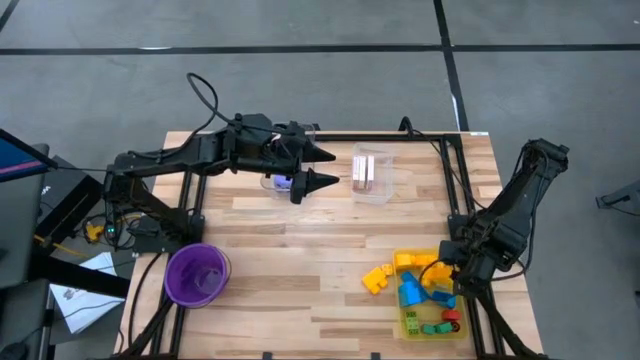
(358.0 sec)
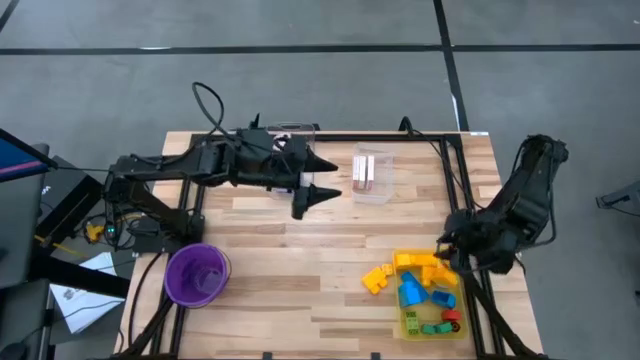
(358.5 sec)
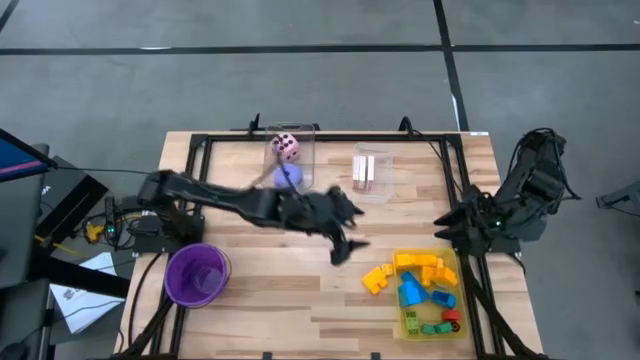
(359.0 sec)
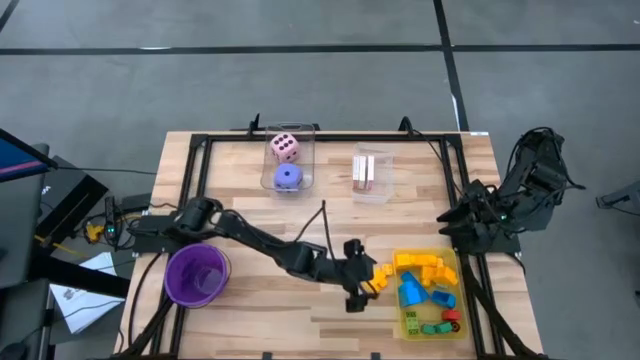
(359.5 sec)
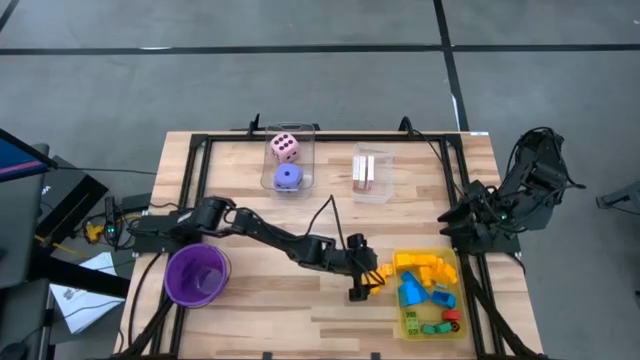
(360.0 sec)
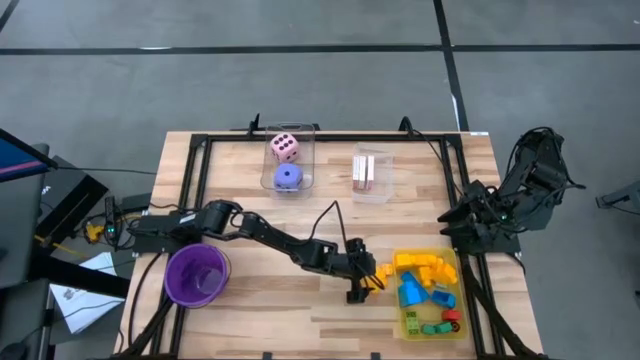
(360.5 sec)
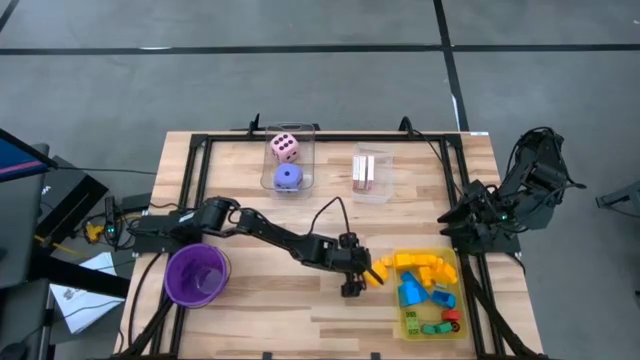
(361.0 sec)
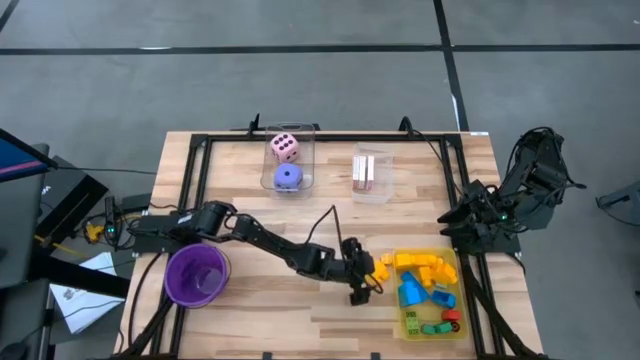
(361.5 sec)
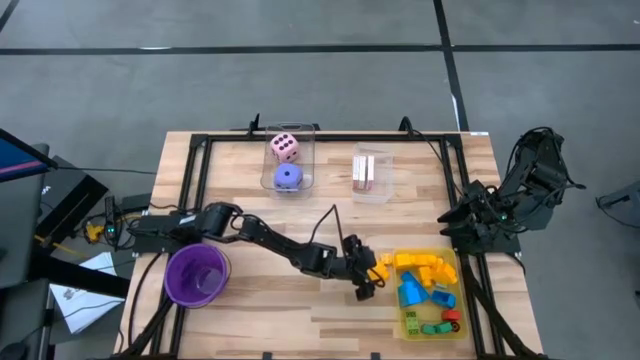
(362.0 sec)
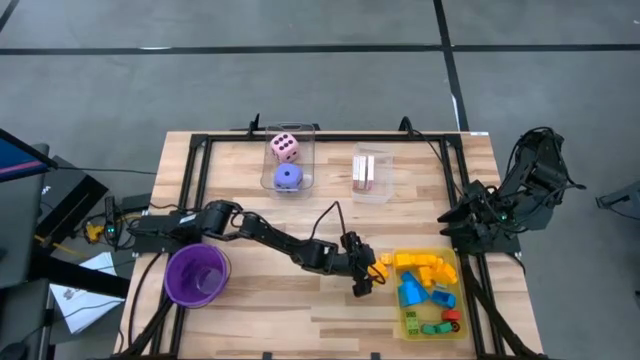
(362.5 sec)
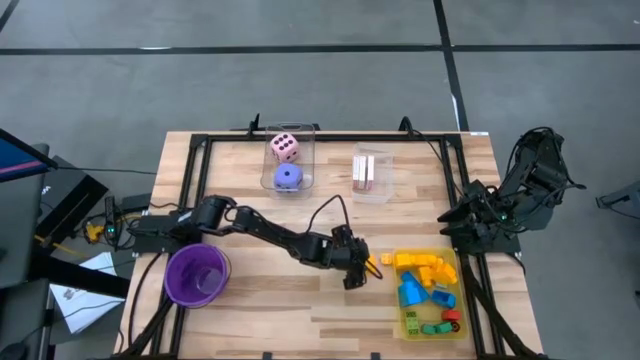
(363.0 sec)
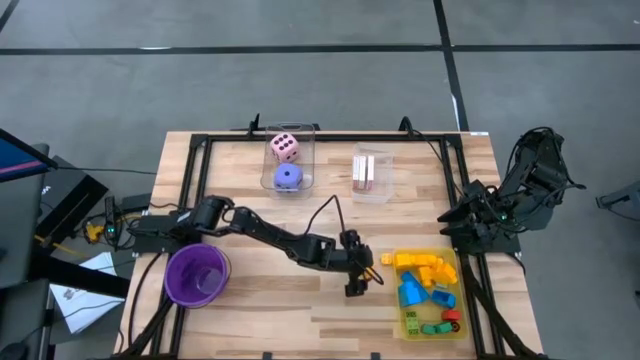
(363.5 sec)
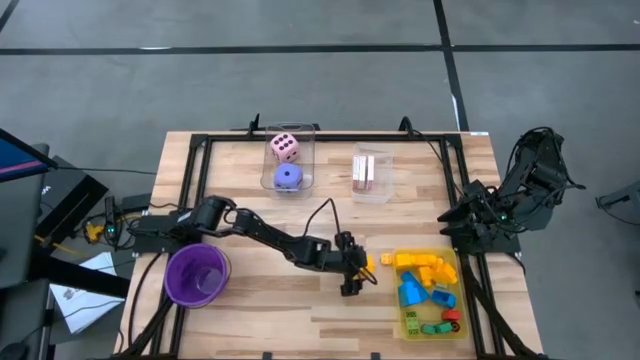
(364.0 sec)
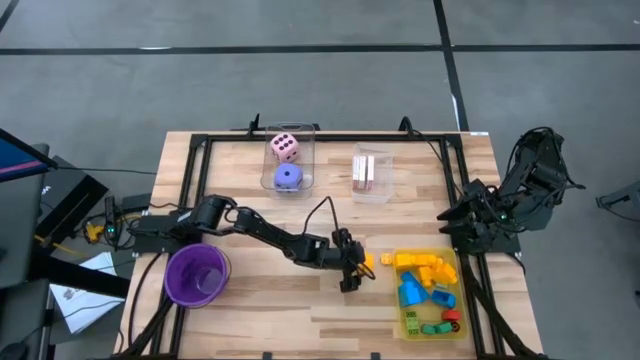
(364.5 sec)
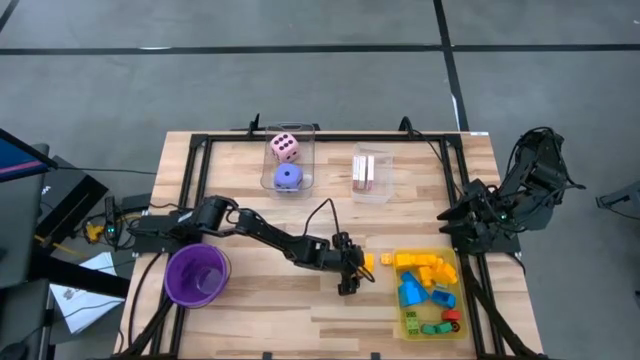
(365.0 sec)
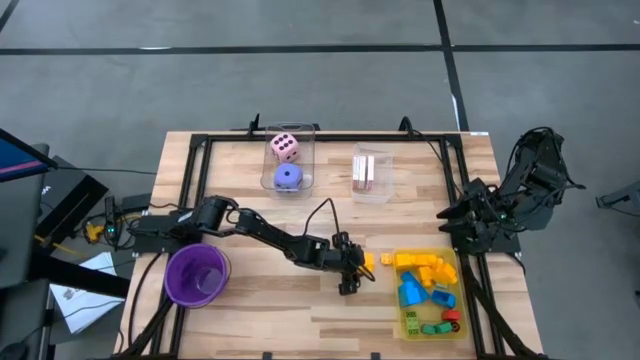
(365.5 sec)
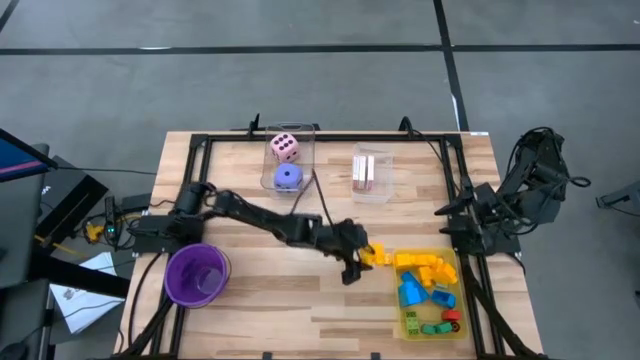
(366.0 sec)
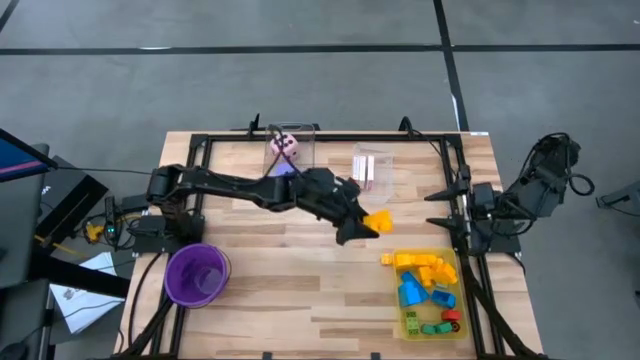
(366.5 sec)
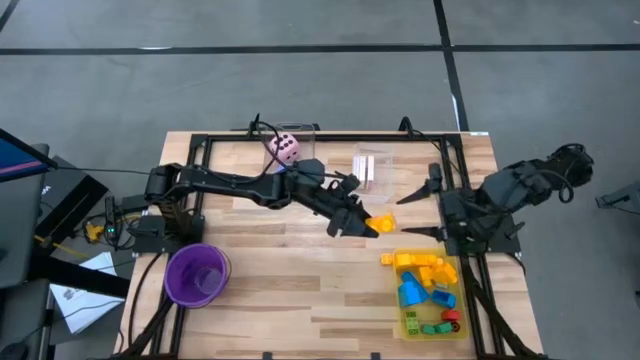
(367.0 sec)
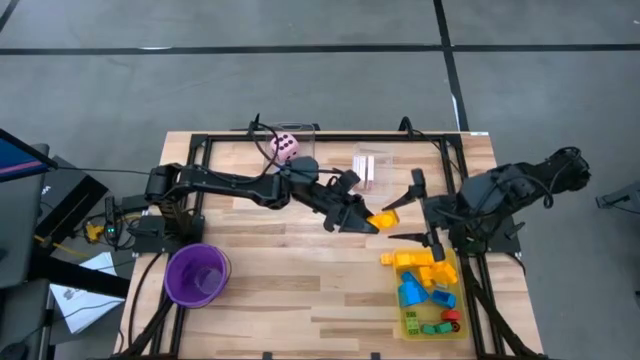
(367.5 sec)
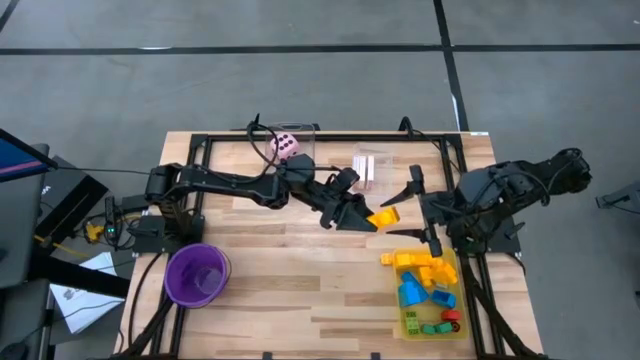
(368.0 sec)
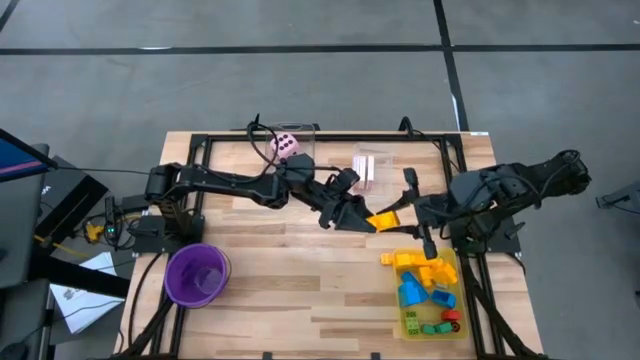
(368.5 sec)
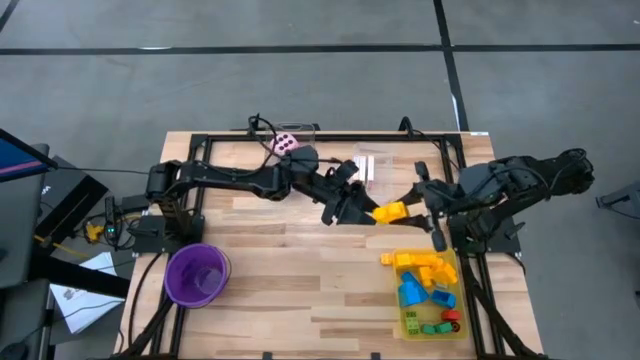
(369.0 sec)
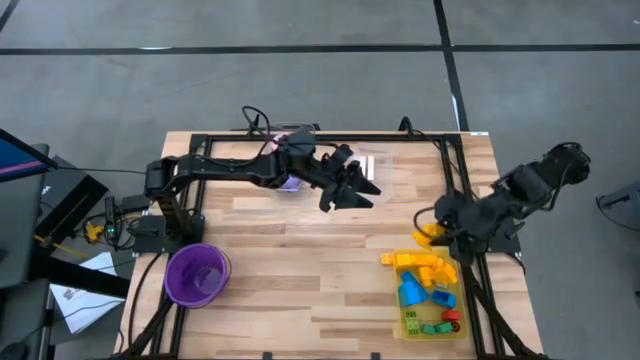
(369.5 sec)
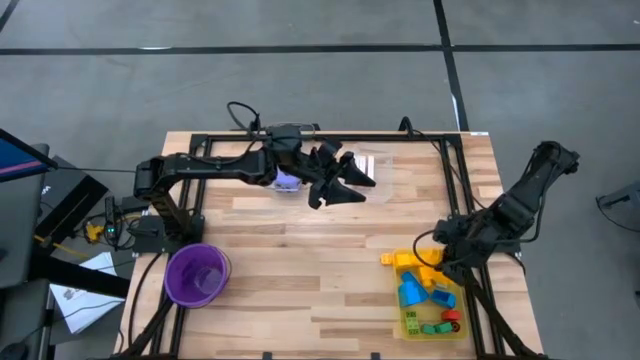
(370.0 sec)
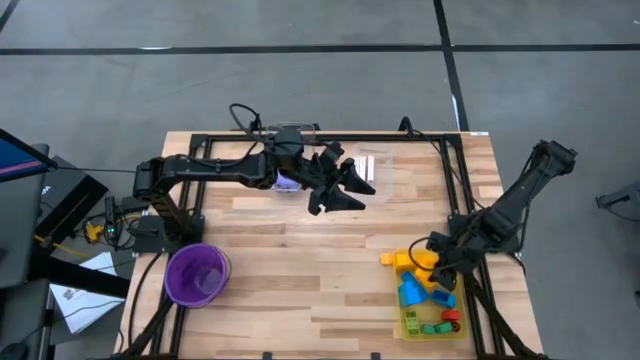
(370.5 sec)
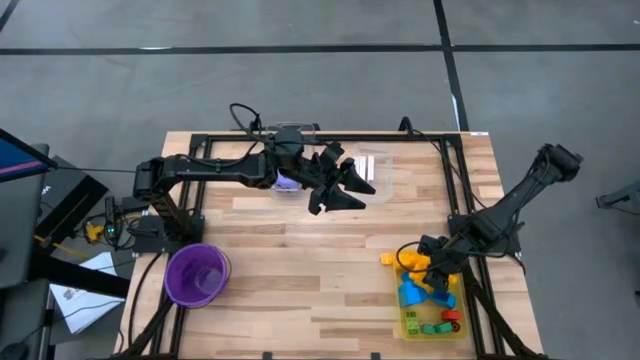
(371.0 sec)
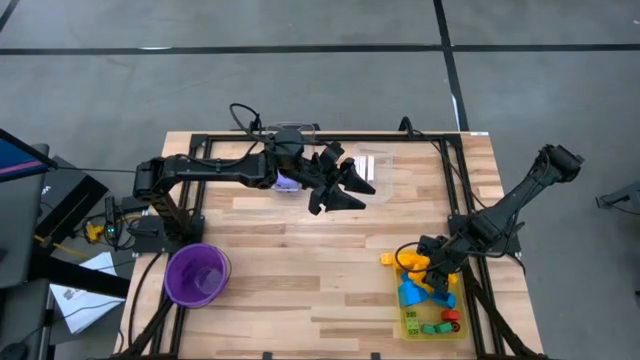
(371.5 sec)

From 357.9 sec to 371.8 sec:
Task: Pick & Place Toys
Put the left yellow game piece into the bin

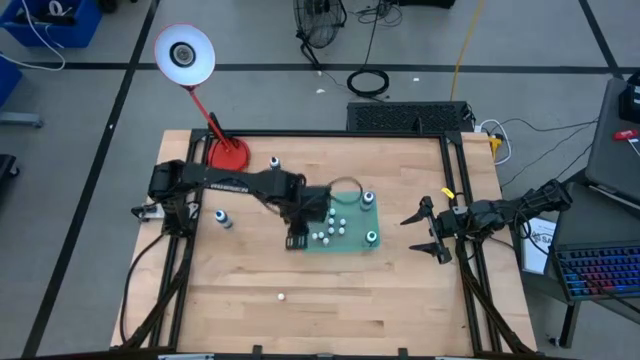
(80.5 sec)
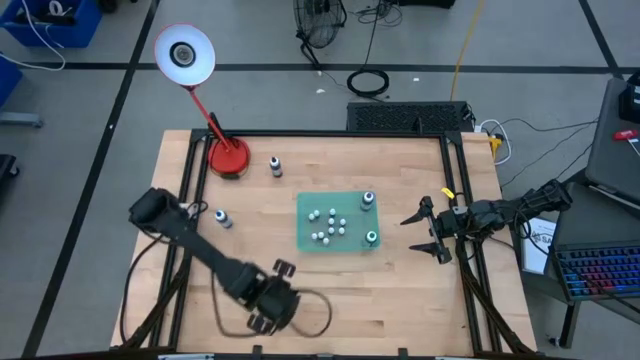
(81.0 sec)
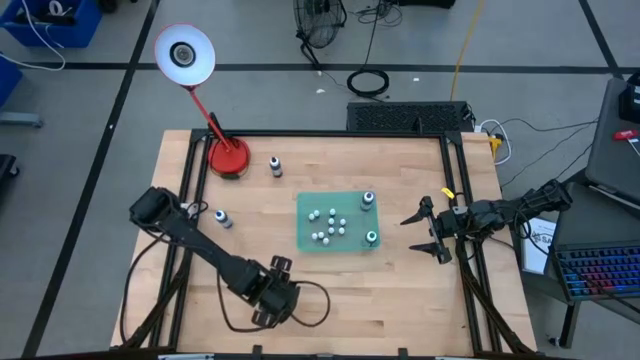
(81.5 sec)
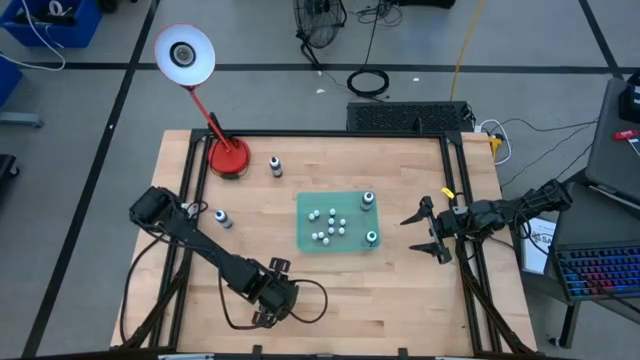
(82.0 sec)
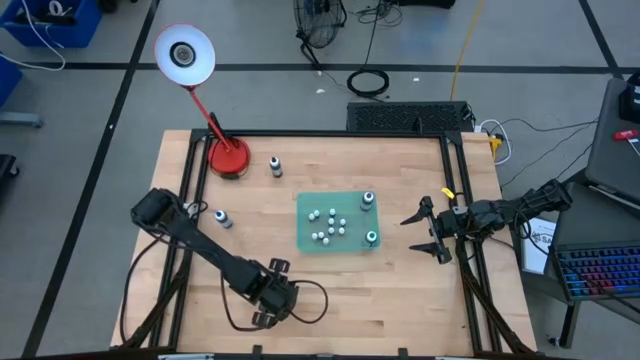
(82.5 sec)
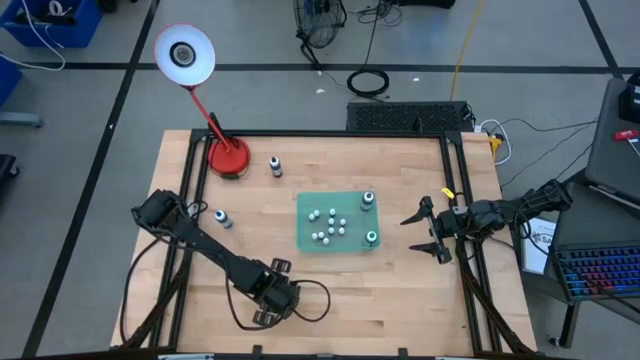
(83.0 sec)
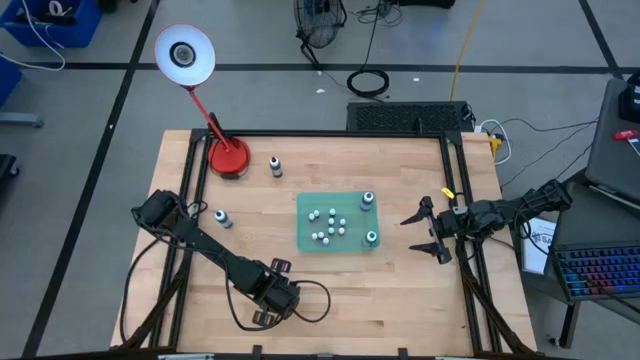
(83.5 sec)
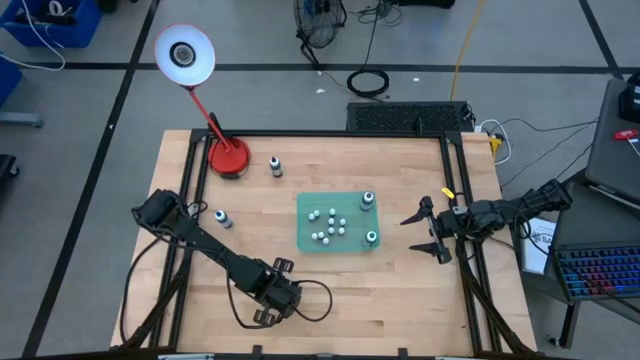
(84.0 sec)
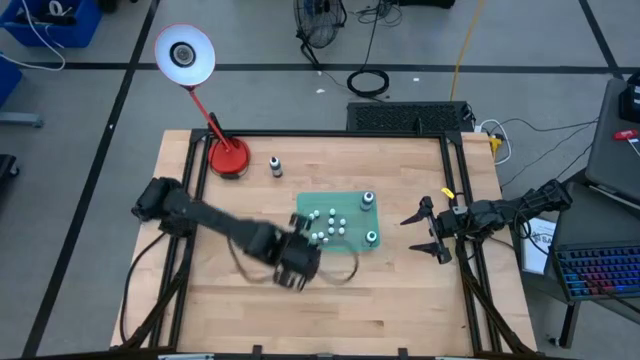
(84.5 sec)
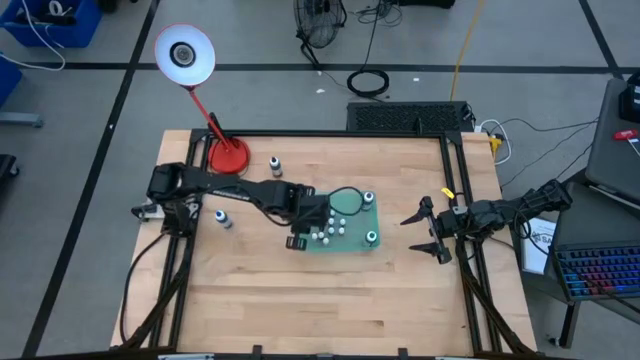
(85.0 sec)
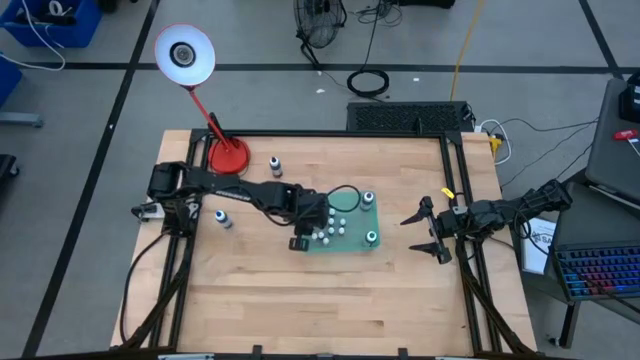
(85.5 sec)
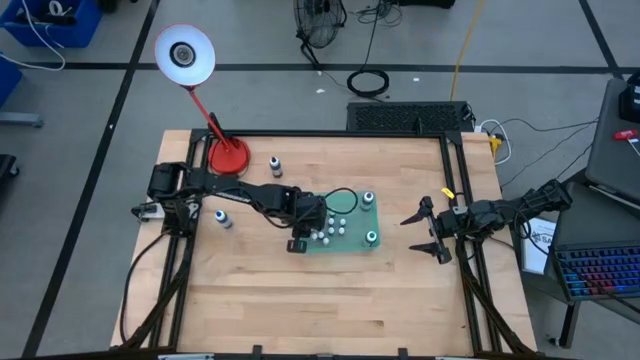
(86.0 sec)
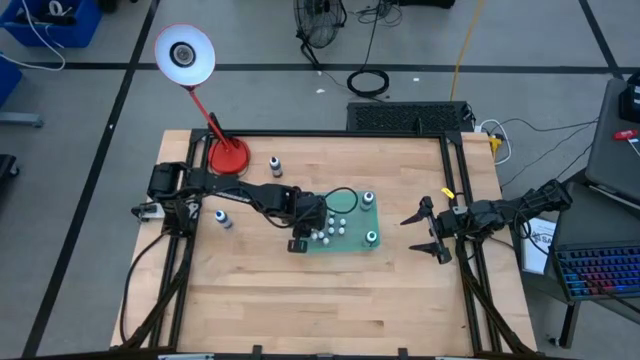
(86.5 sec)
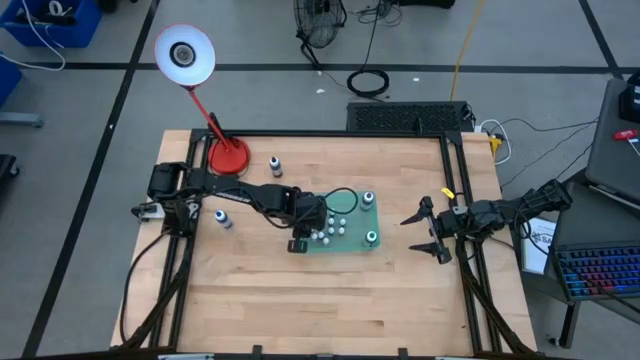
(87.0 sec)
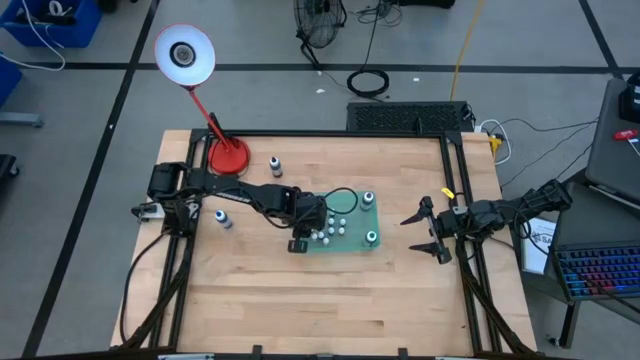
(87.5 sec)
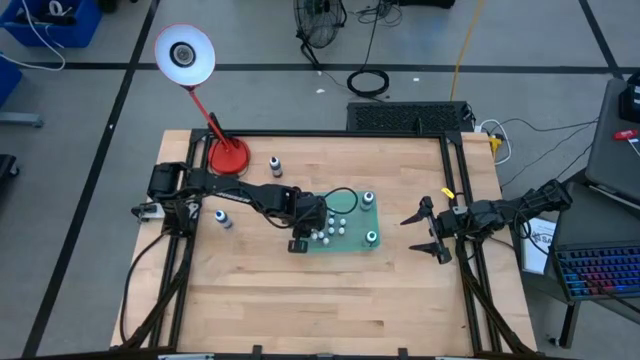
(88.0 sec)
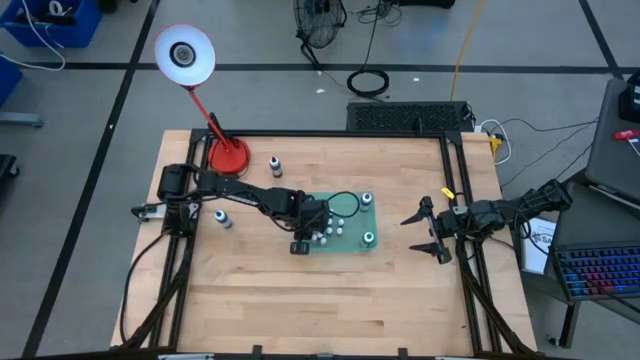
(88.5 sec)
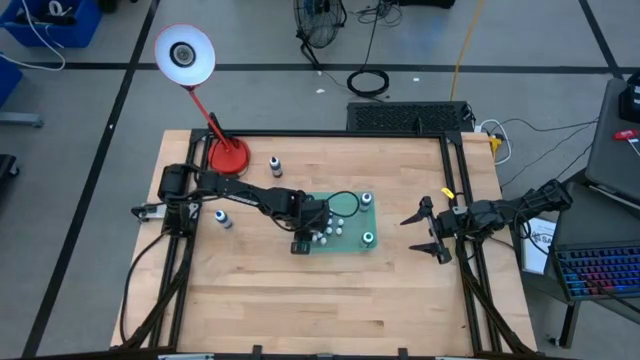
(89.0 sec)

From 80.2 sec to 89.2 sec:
Task: Pick & Place food coloring
Put the small orange food coloring bottle into the blue bin
